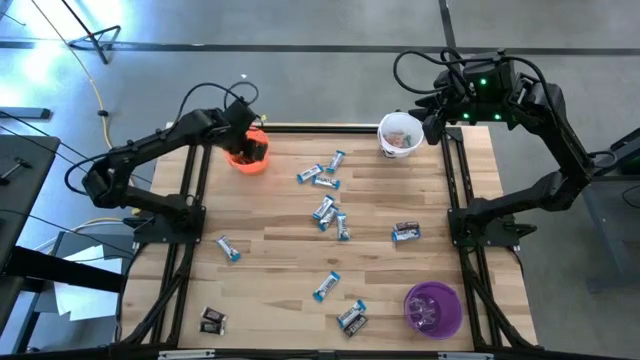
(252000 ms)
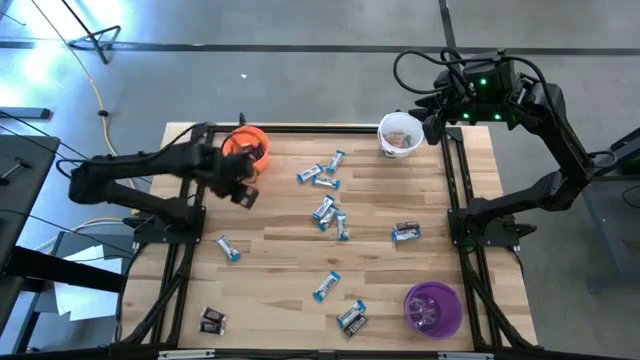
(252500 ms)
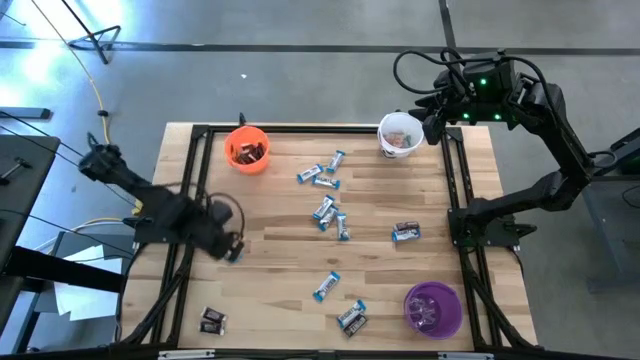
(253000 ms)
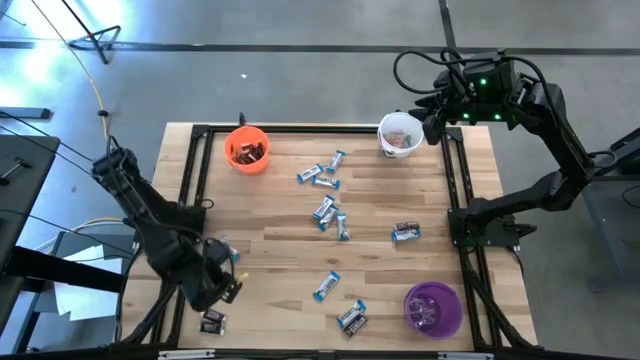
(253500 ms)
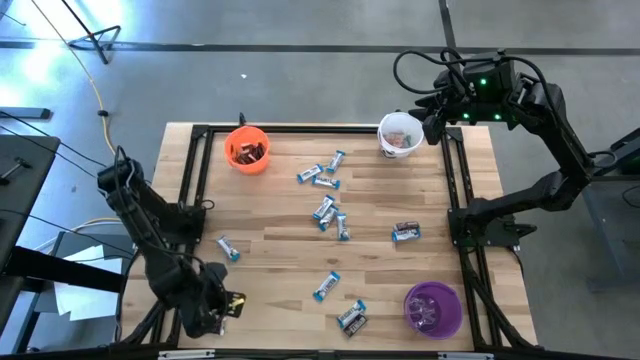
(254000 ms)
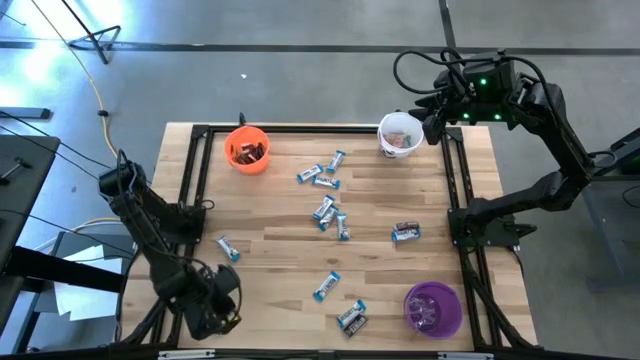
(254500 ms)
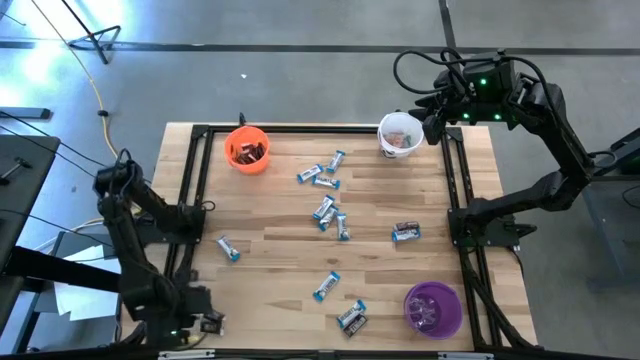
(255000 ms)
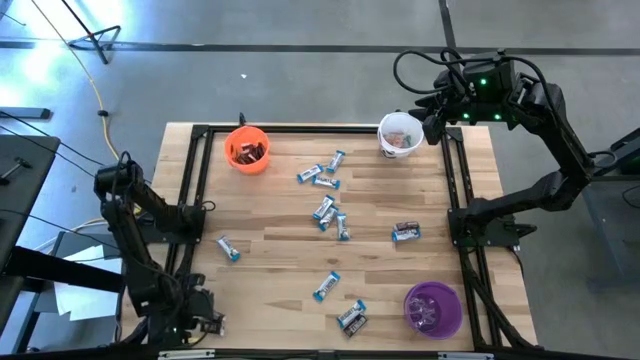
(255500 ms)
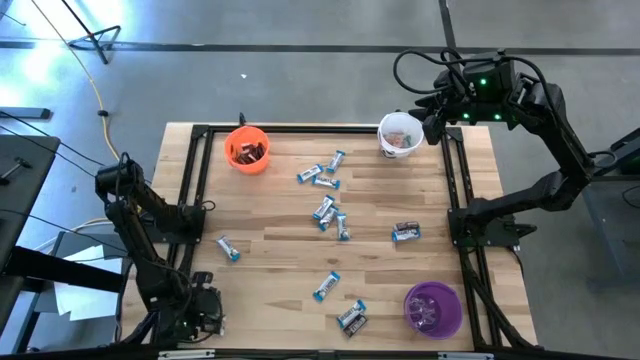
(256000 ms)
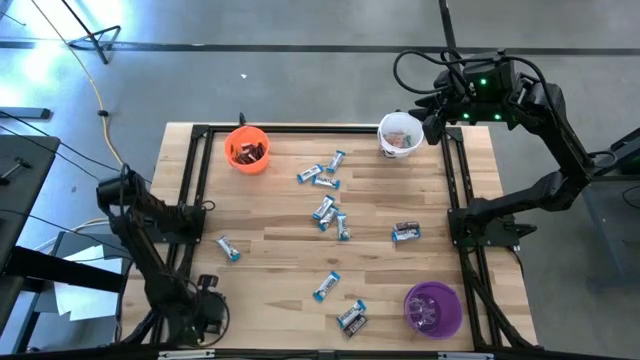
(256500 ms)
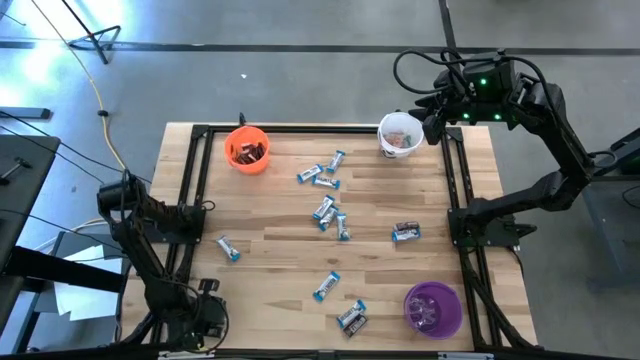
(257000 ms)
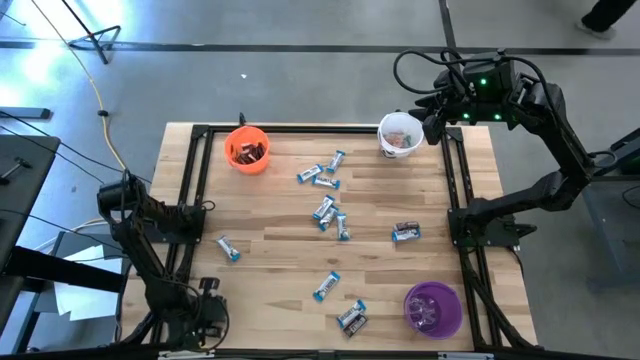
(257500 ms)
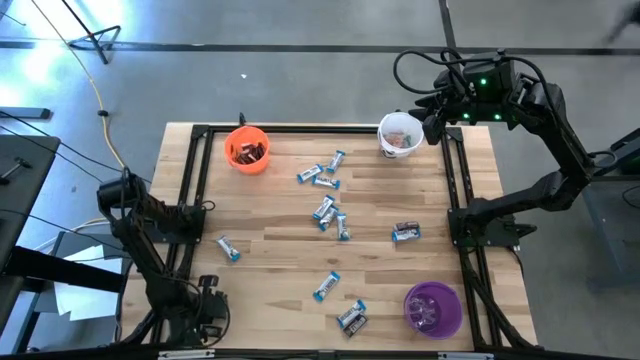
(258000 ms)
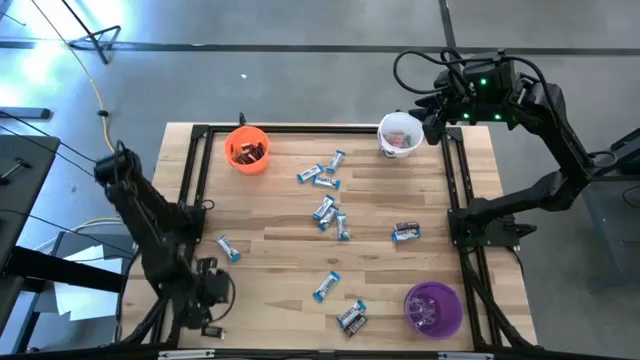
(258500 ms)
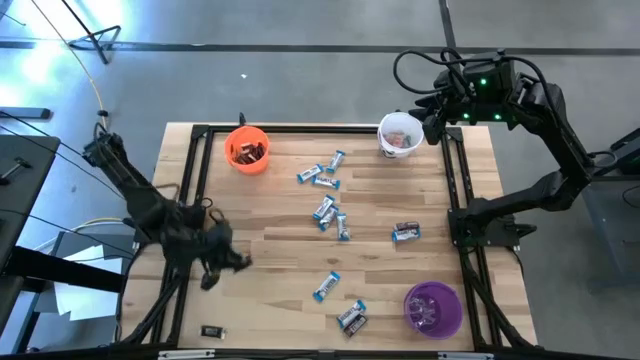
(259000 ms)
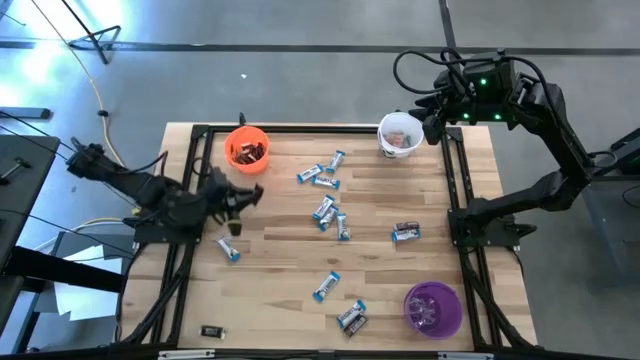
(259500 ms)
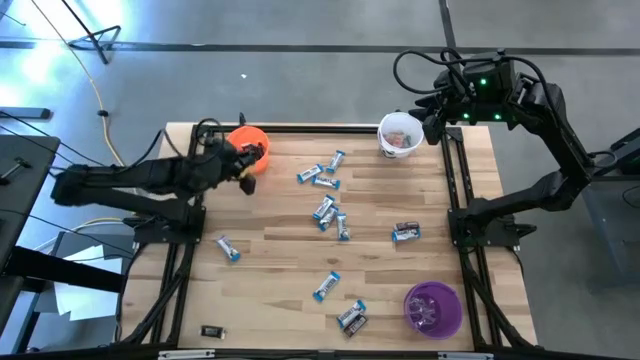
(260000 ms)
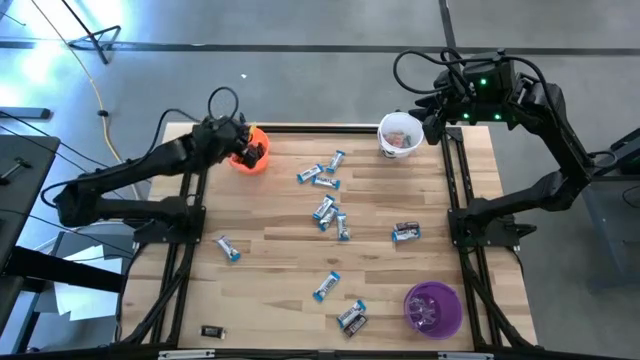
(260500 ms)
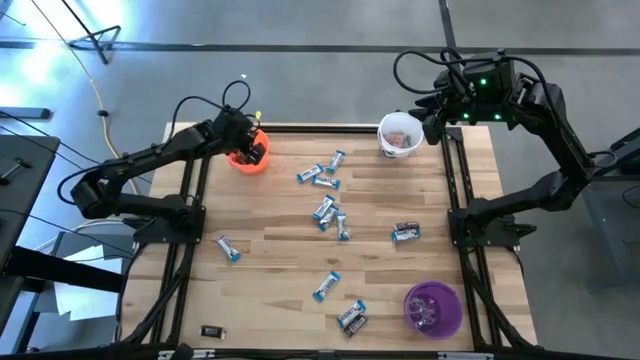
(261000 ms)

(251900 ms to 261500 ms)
Task: Sort candy
Put the brown chocolate into the orange bucket

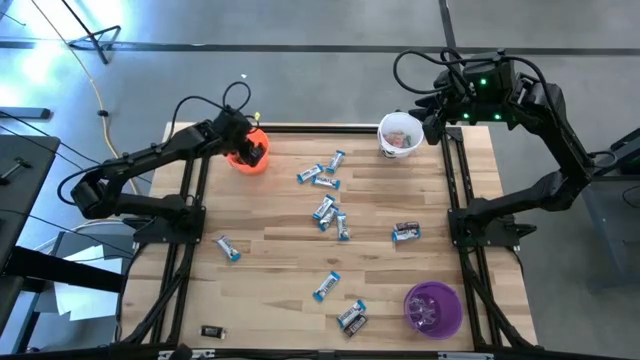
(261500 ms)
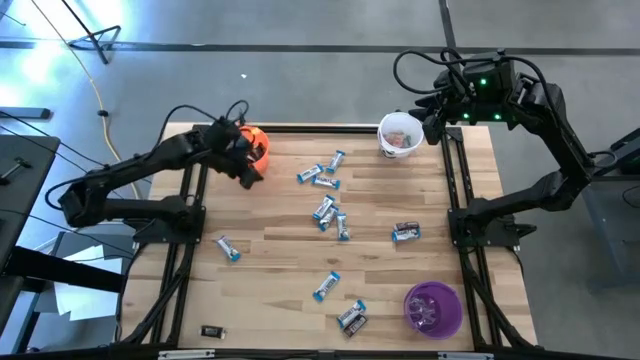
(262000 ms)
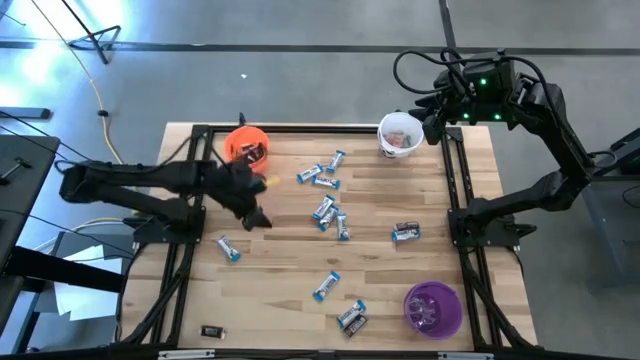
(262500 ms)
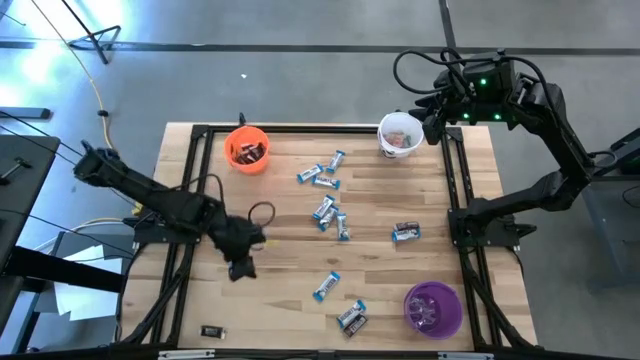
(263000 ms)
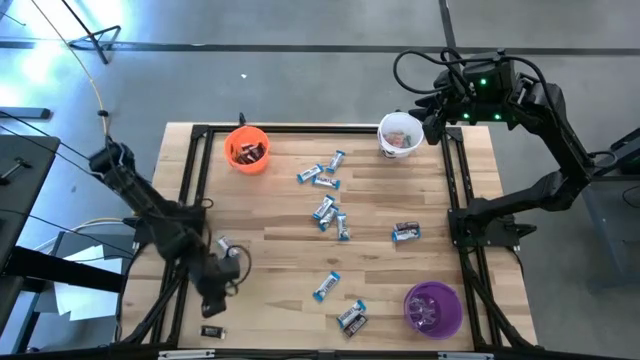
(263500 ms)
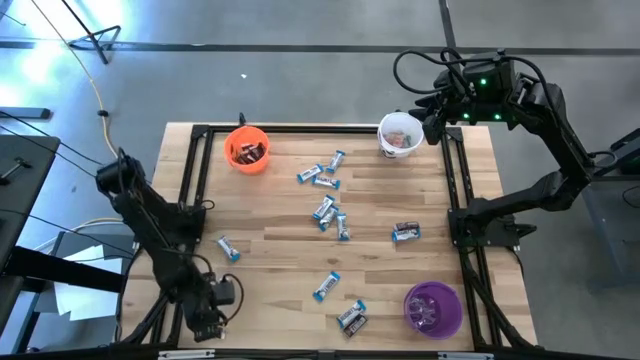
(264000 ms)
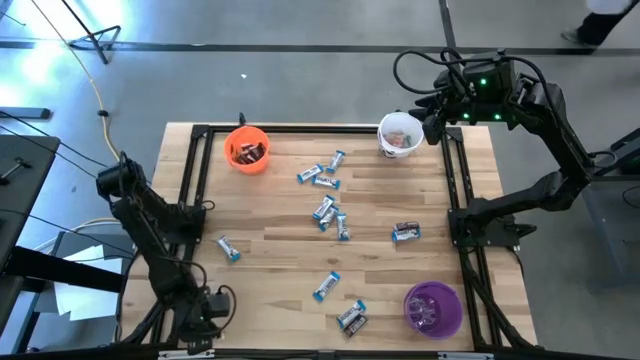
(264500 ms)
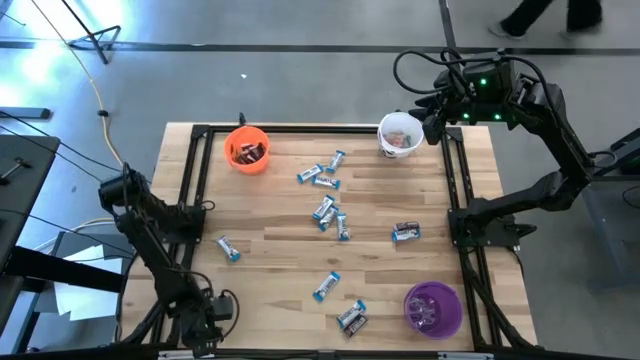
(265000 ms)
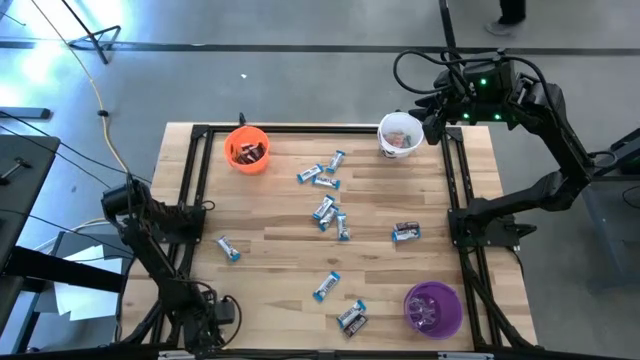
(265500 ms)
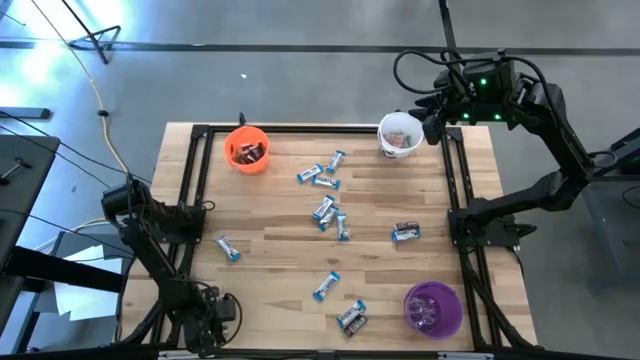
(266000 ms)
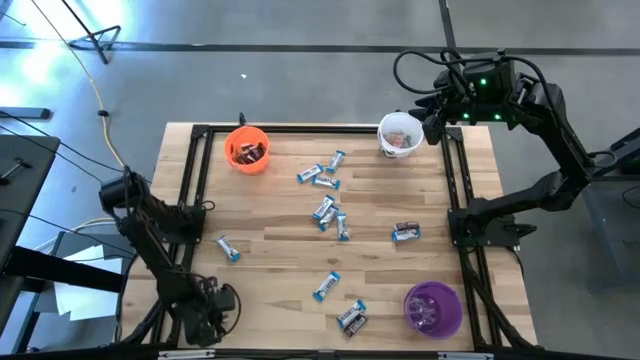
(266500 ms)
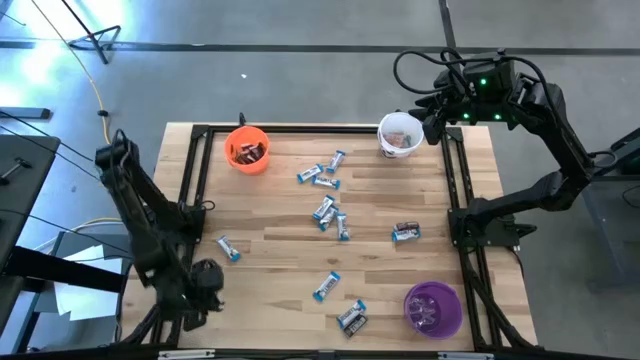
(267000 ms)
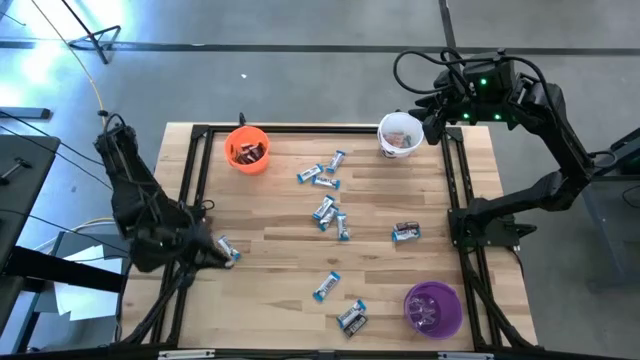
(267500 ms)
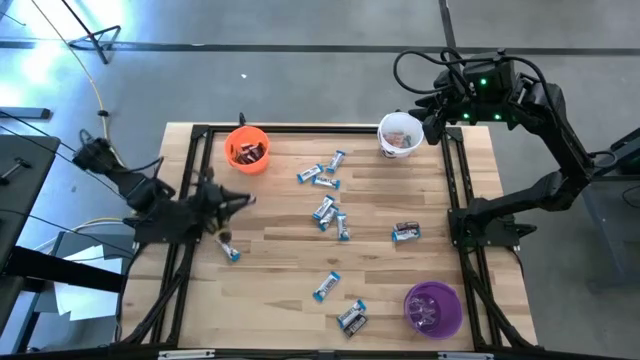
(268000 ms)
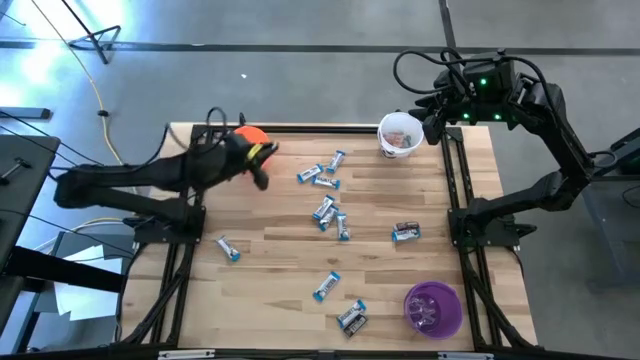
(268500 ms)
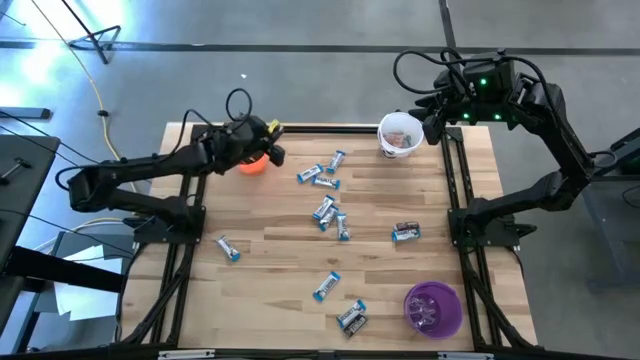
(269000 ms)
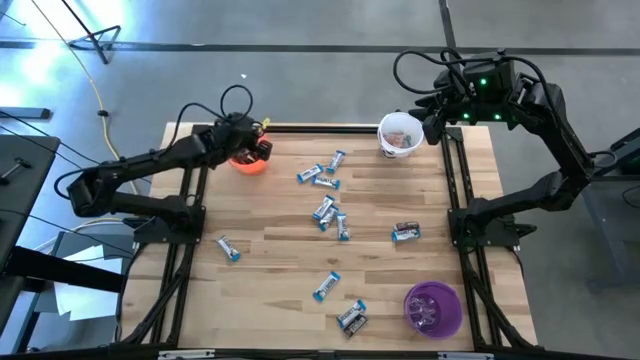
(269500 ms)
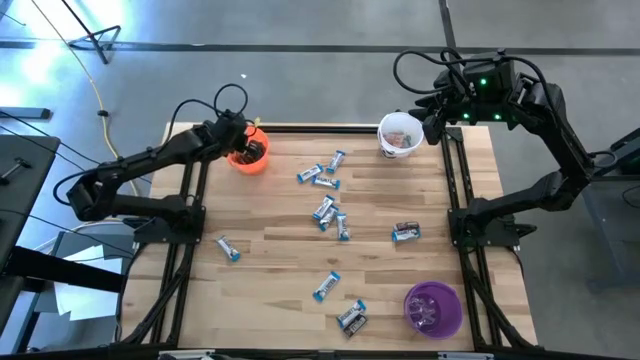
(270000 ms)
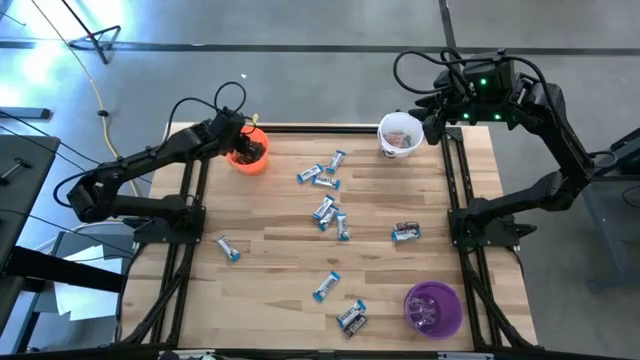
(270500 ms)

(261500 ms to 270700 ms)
Put the brown chocolate into the orange bucket

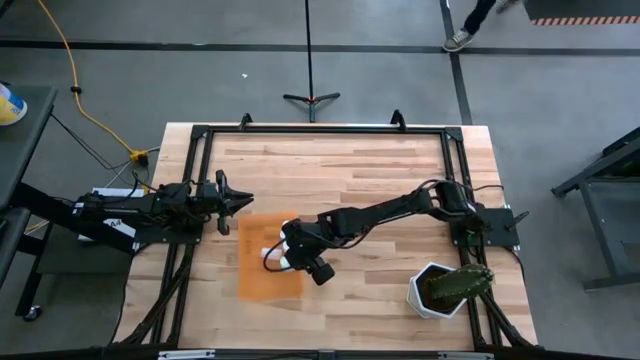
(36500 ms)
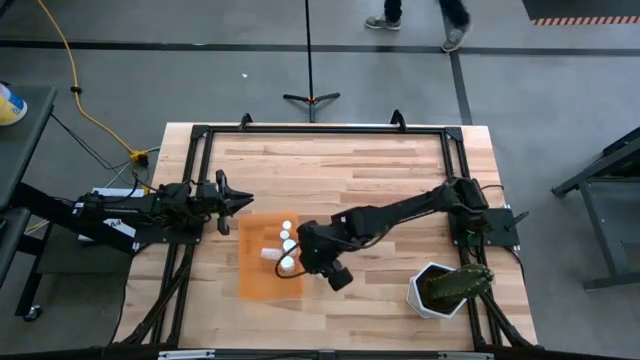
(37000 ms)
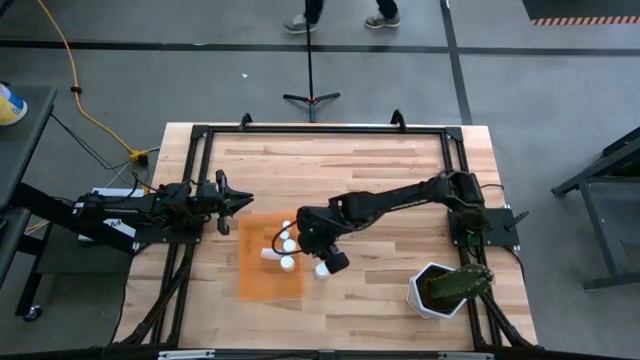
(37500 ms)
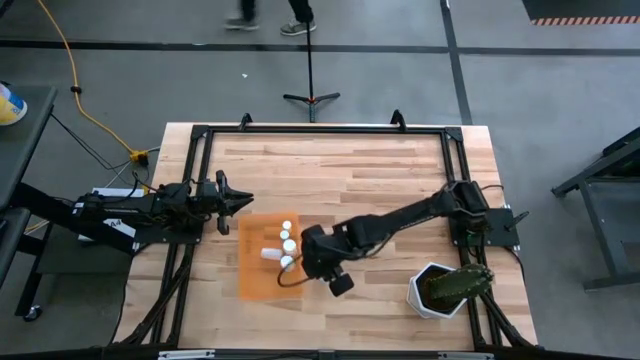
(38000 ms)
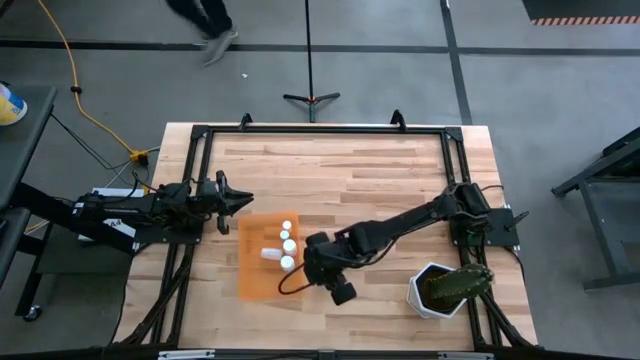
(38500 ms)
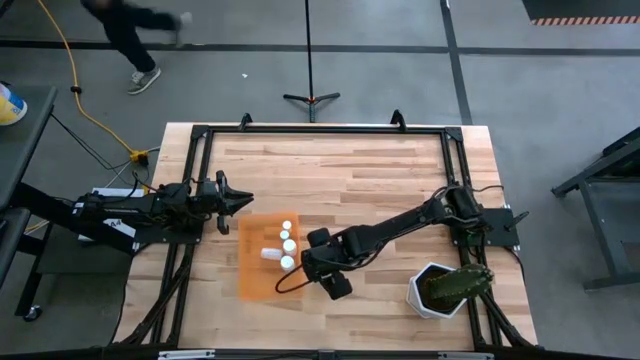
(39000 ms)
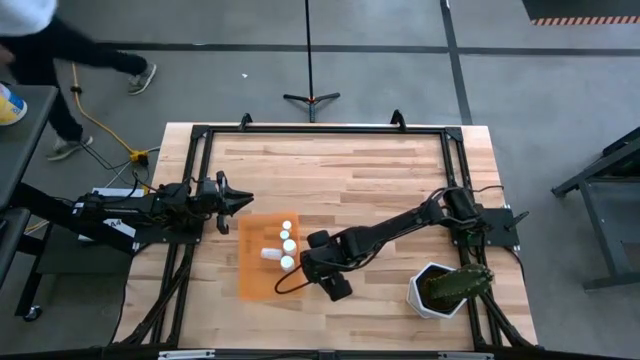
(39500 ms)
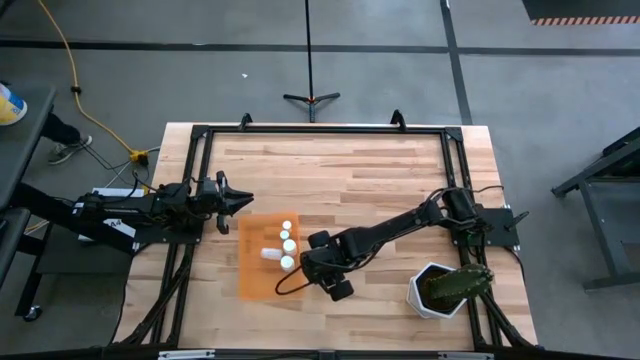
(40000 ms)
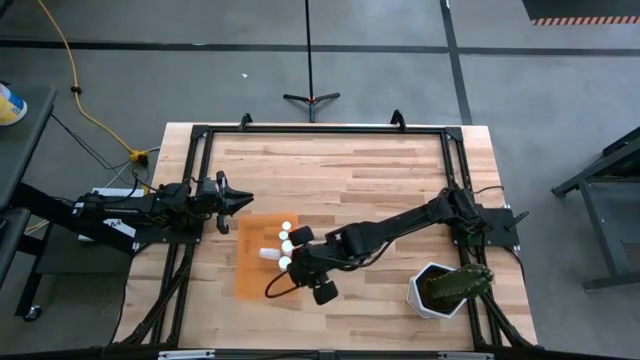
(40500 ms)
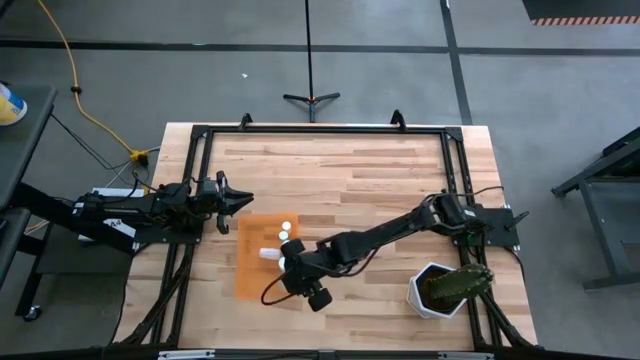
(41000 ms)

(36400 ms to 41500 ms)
Task: Pick and place pill bottles into a basket
Put the white pill bottle into the orange bin
